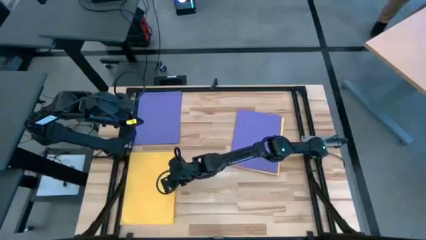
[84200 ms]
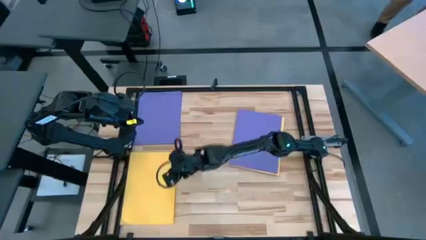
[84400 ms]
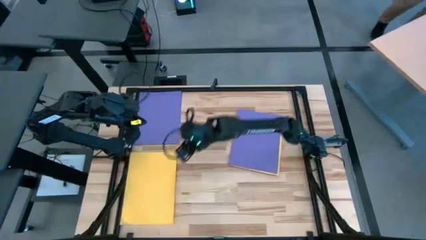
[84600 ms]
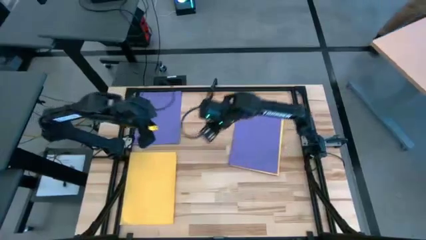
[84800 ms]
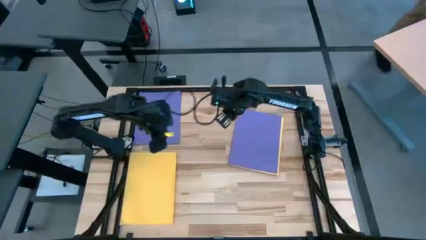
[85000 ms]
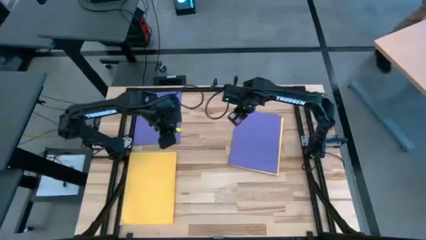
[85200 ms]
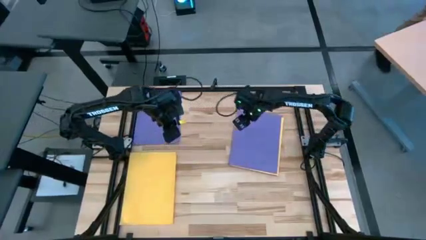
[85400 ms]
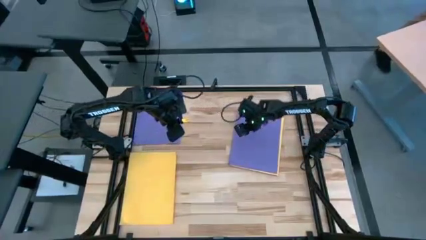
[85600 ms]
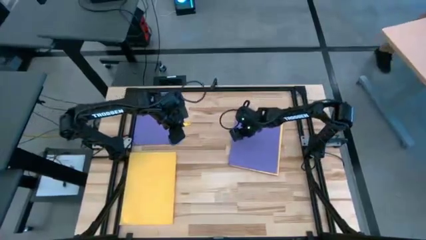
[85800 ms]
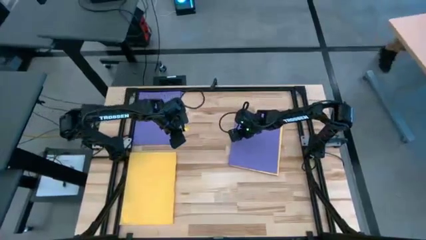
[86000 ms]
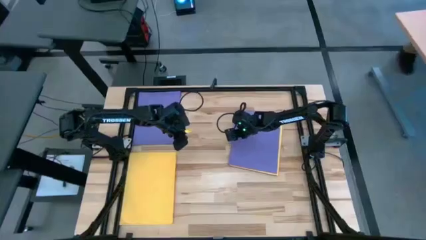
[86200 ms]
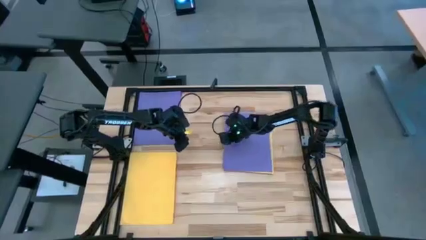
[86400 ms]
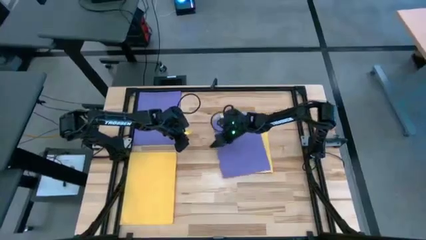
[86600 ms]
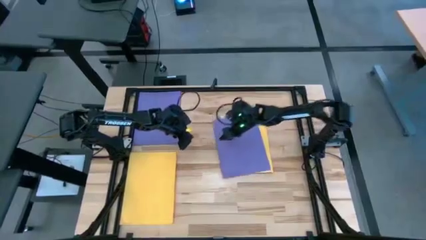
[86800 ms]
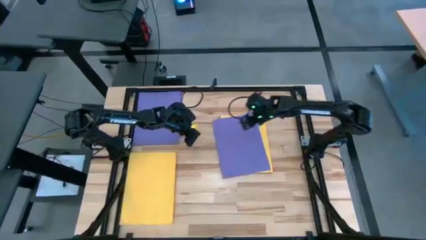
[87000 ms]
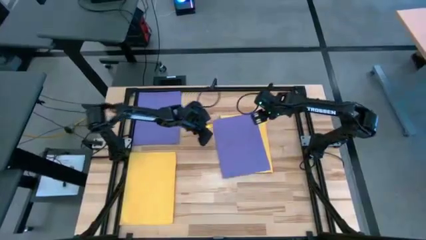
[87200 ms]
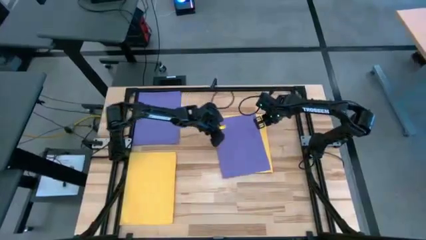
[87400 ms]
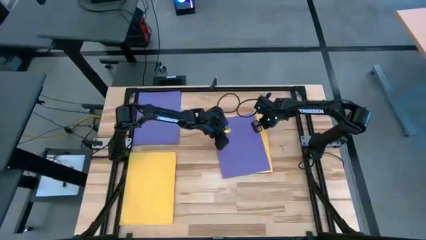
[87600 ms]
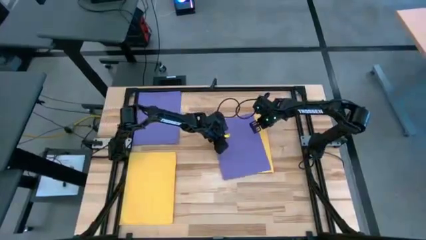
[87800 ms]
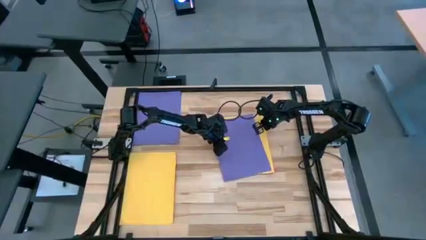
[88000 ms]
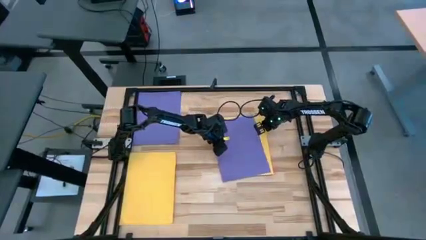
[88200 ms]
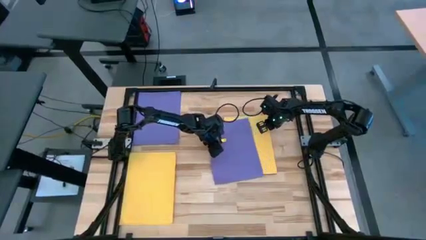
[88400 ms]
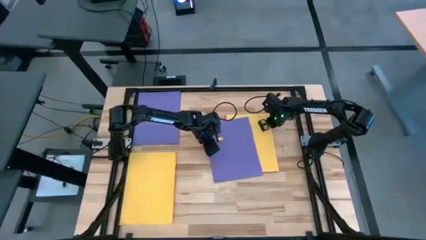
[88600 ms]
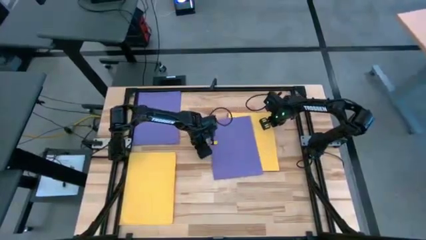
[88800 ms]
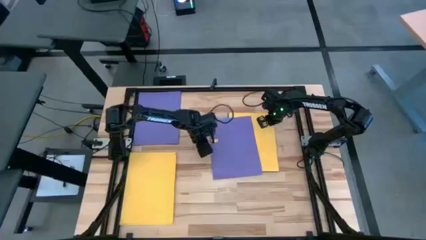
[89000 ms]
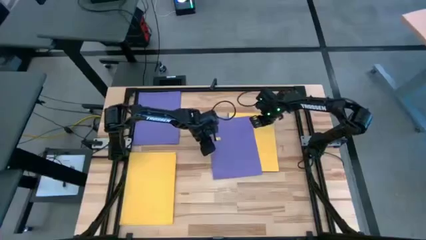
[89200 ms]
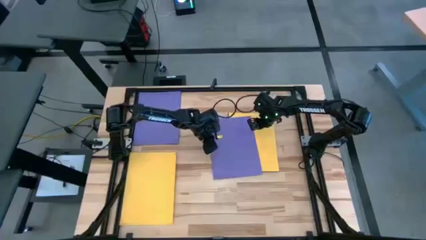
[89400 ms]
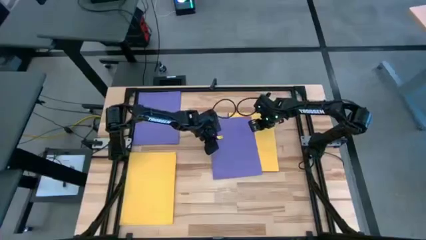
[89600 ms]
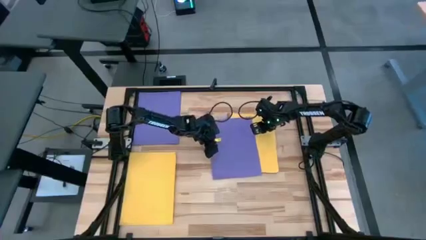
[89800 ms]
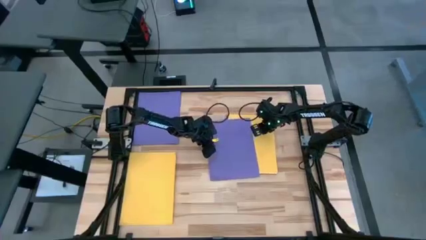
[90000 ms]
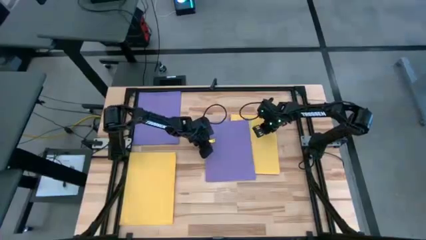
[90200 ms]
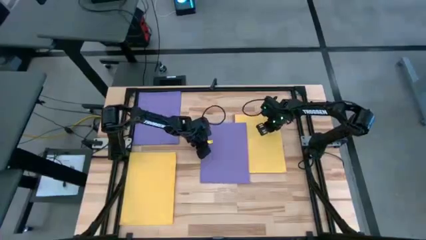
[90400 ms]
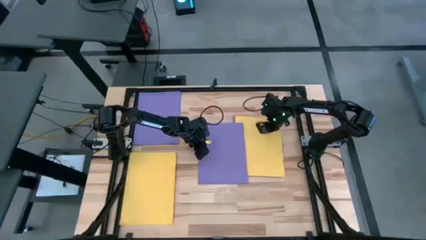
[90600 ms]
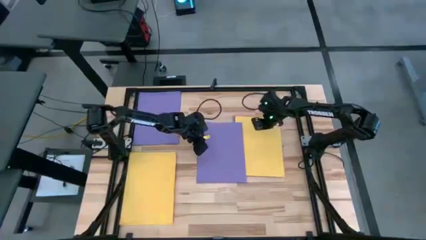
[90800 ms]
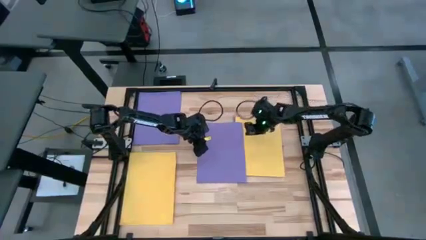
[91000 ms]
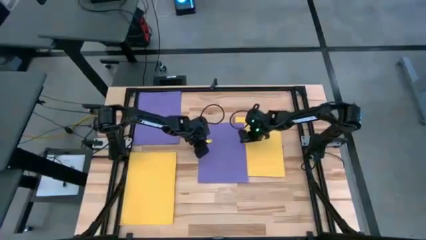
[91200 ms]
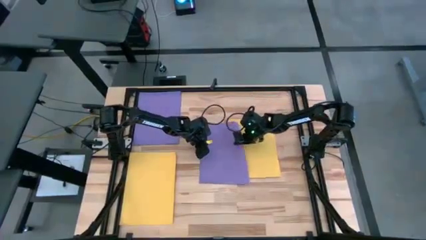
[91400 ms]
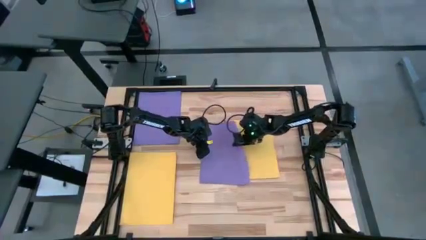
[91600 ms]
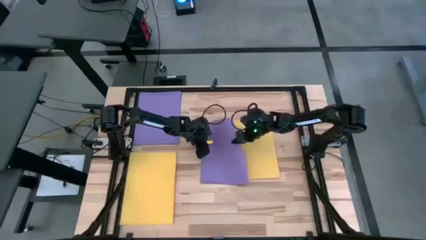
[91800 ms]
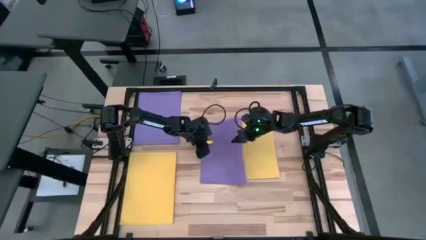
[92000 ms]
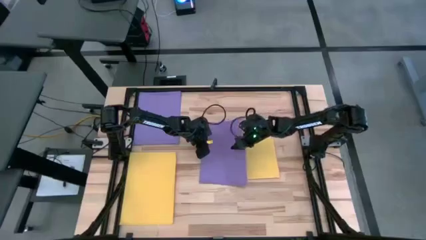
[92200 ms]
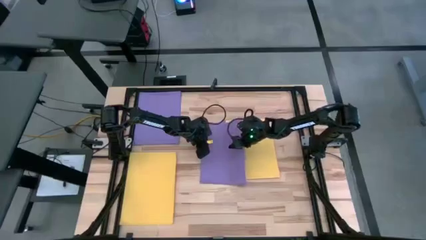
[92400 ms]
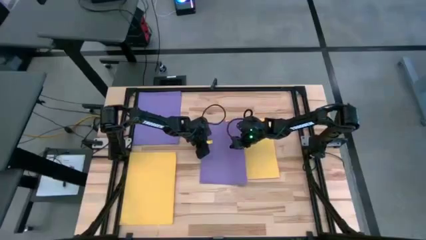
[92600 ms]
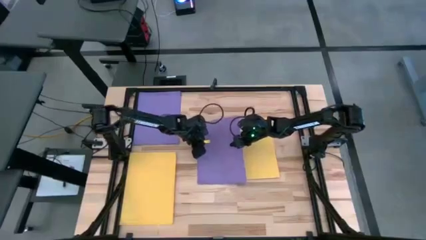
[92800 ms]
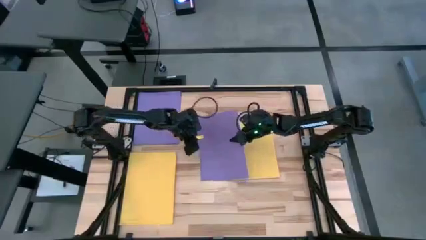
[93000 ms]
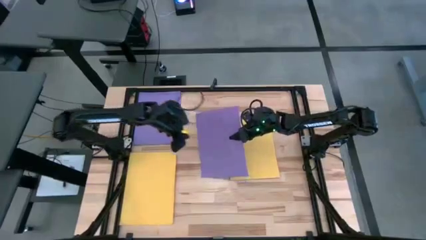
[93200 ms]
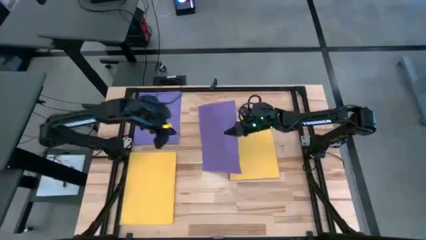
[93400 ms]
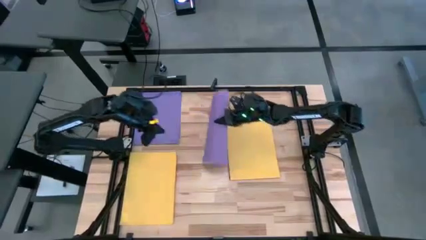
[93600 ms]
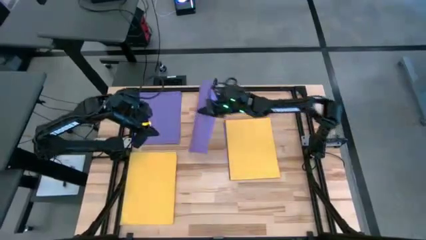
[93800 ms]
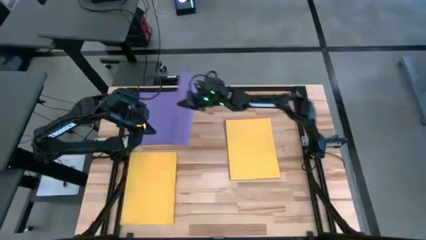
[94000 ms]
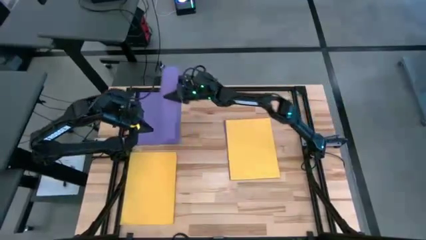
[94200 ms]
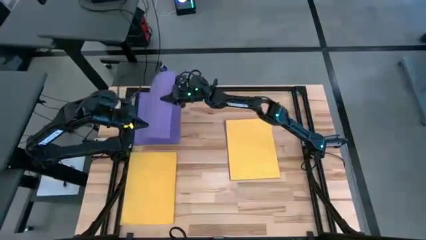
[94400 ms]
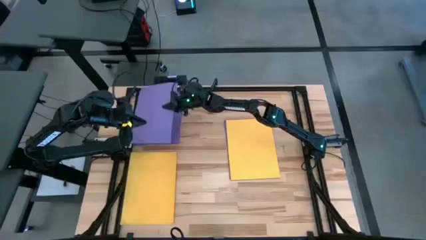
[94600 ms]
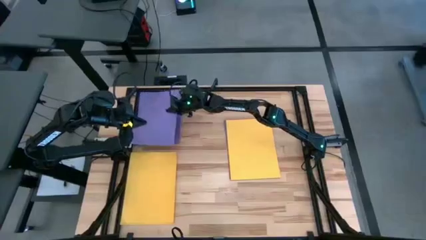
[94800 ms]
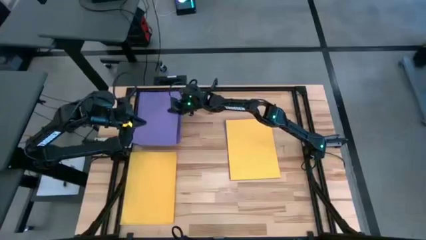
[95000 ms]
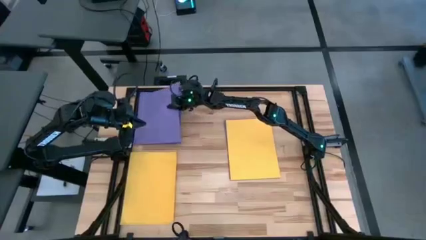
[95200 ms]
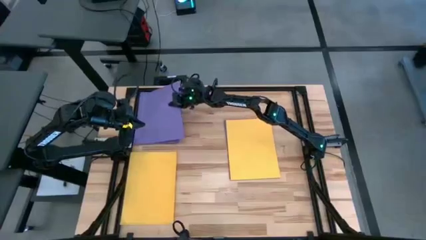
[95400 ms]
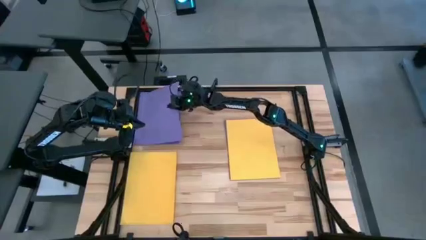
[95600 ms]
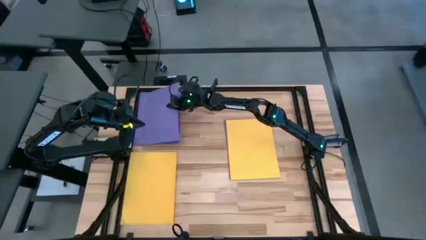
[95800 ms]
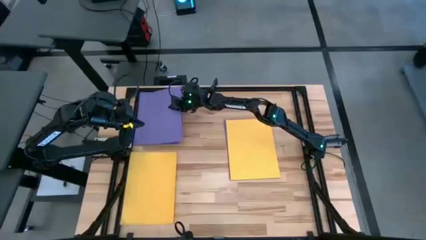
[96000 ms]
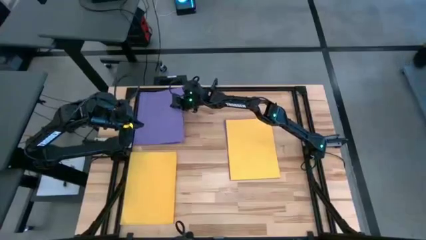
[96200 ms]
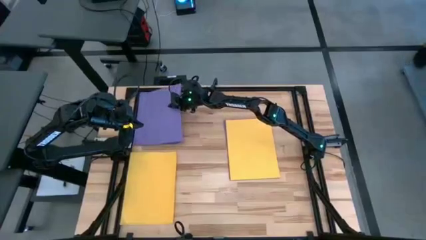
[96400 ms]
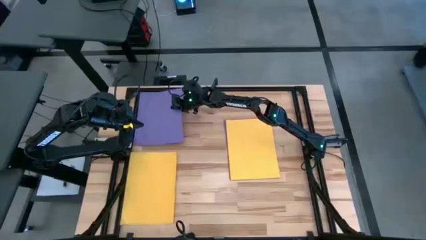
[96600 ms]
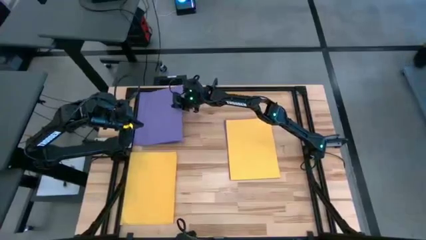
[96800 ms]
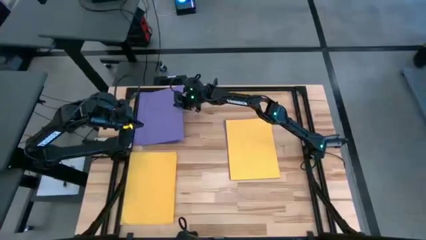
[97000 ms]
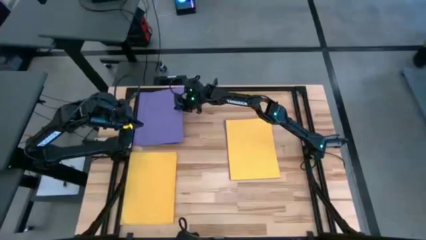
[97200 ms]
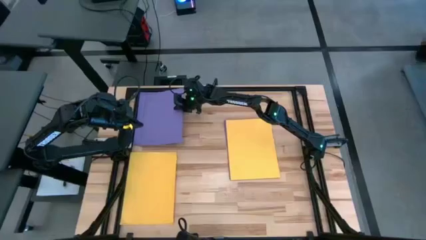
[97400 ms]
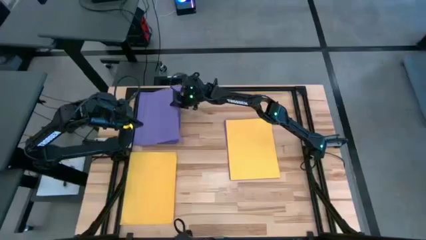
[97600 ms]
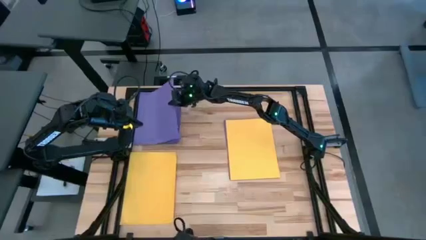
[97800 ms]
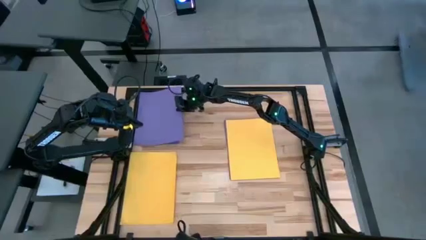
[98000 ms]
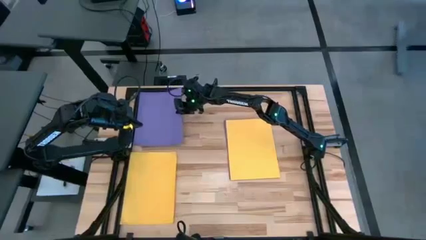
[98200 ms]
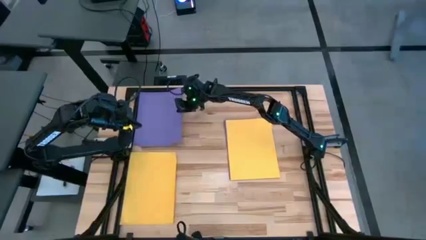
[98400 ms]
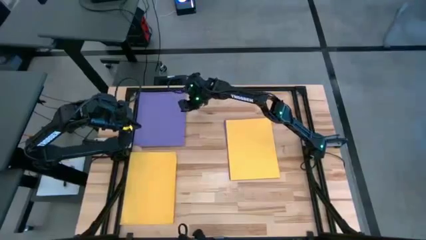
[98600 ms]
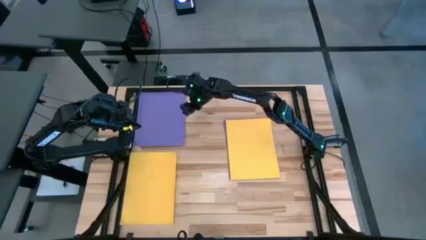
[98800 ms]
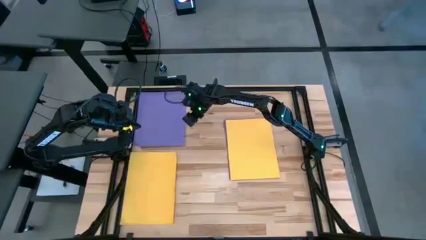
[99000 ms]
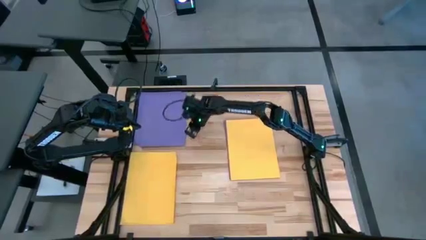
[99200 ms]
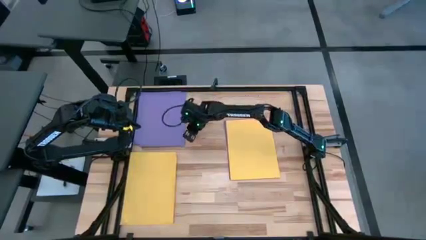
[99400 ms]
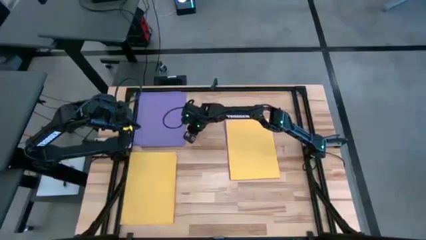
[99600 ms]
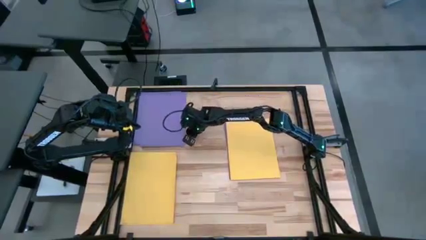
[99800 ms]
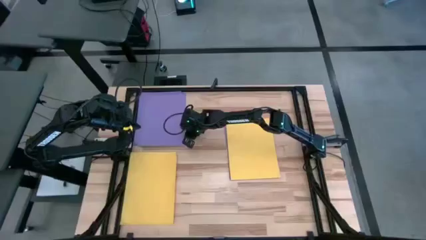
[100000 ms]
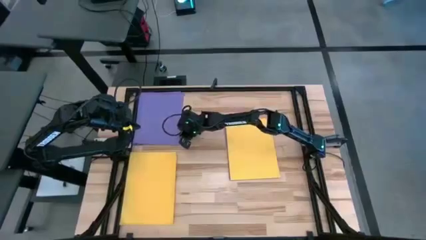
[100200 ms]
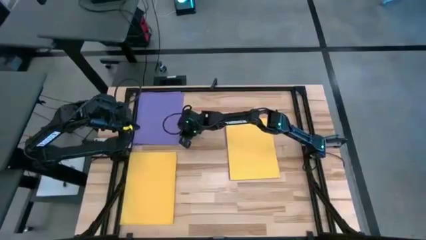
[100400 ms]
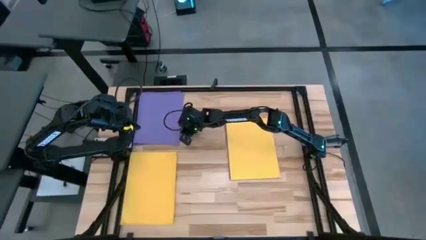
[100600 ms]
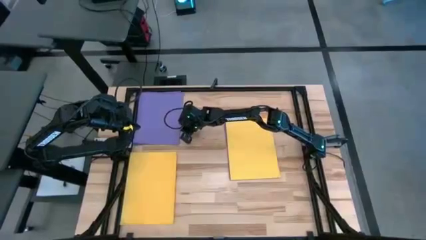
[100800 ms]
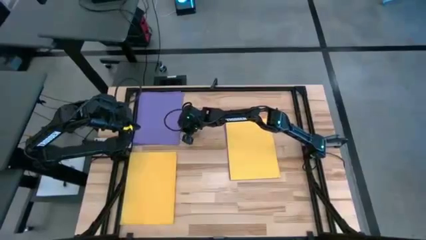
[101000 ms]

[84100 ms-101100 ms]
Task: Organize paper
Stack the purple paper on top of the other purple paper
